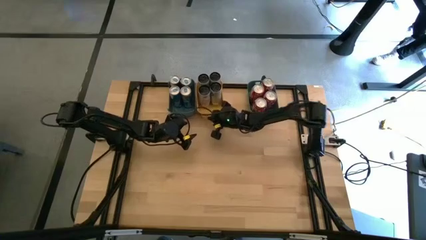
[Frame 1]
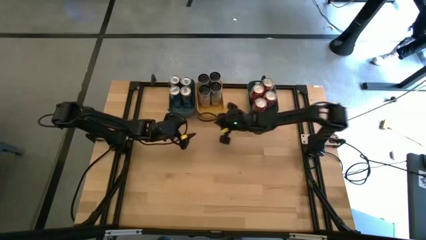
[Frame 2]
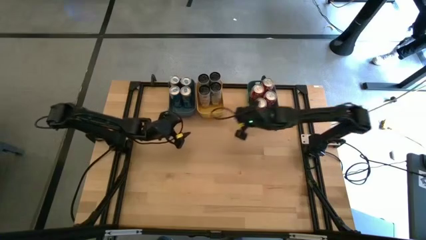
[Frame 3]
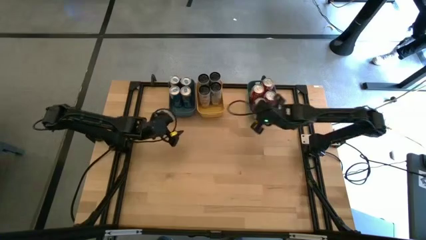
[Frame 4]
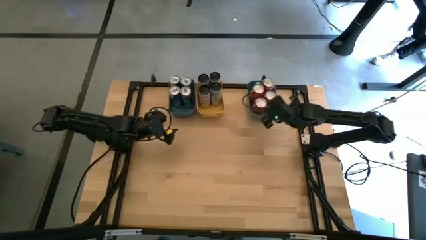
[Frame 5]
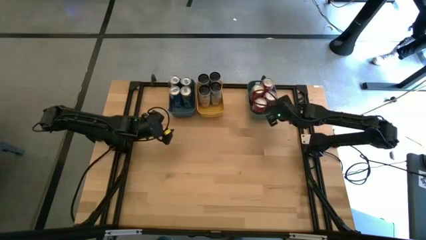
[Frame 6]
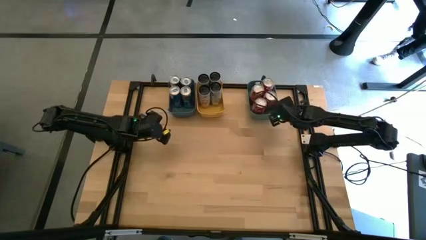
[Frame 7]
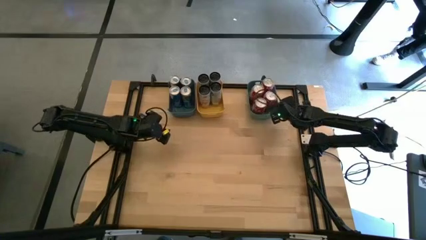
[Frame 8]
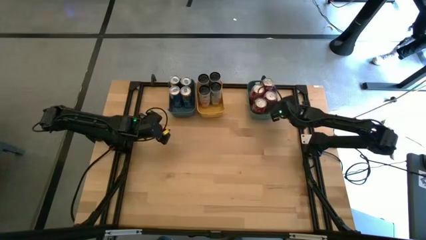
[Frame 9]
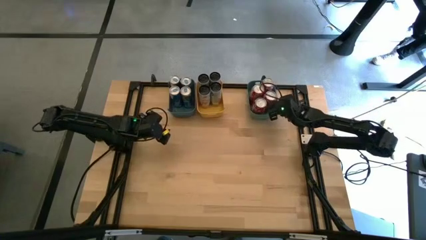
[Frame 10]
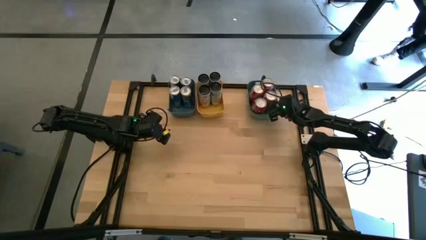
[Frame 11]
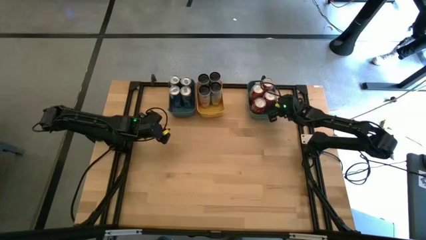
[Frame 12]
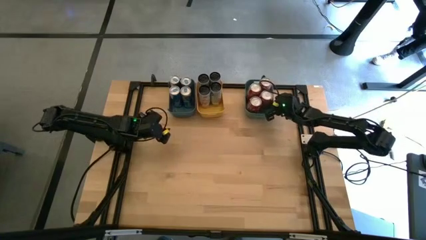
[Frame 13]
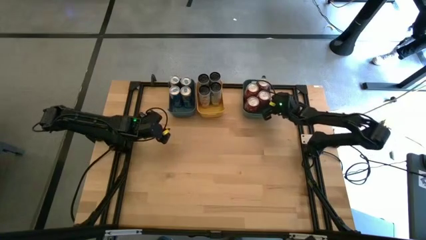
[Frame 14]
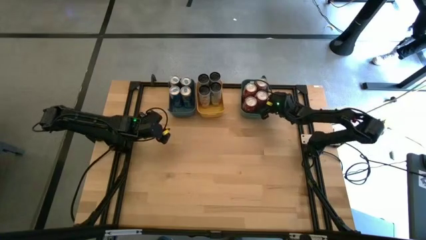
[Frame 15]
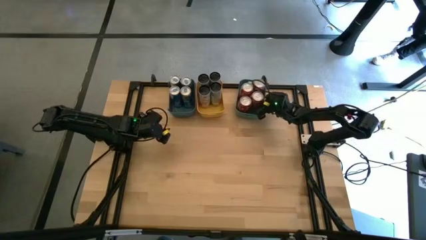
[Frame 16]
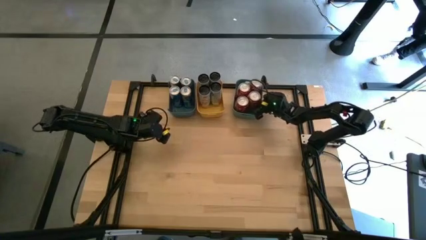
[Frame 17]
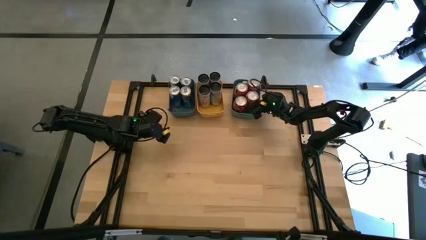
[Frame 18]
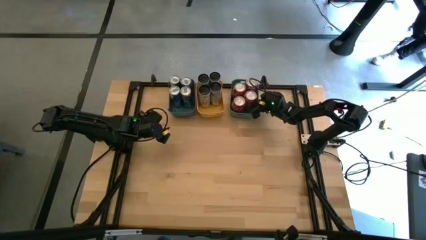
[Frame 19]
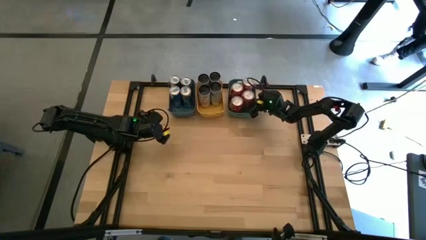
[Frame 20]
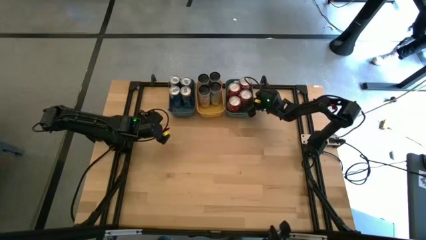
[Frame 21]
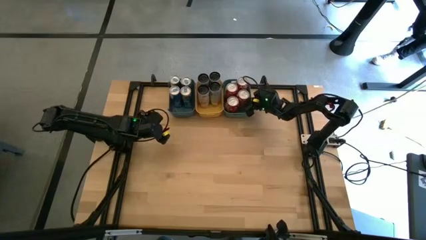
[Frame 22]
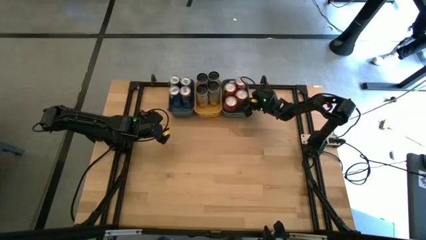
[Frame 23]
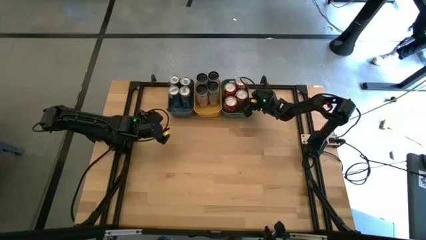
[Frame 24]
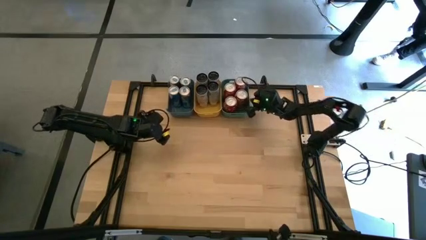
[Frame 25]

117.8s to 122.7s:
Task: Sort soda cans
Adjust the green bin

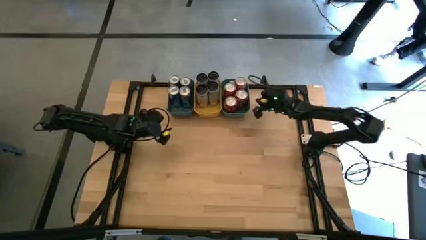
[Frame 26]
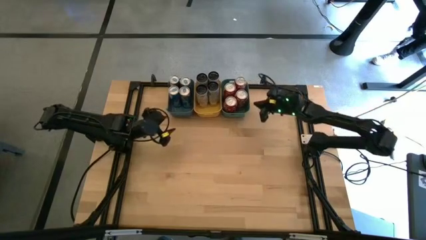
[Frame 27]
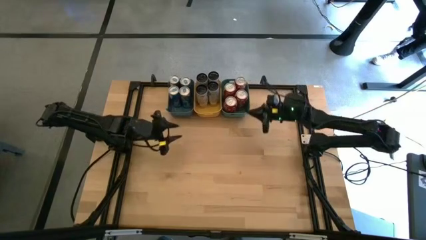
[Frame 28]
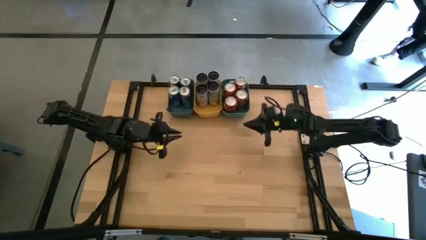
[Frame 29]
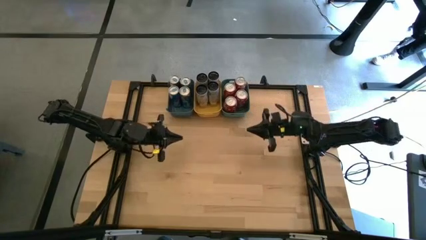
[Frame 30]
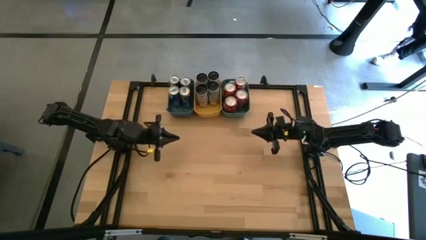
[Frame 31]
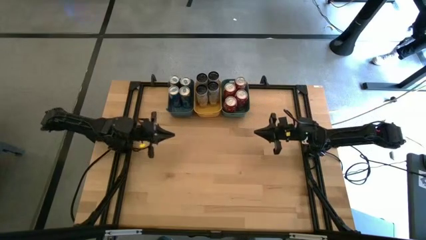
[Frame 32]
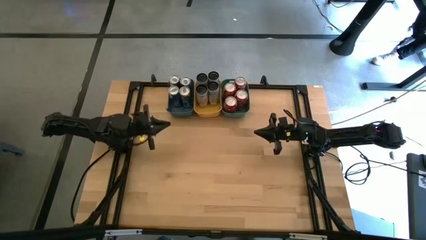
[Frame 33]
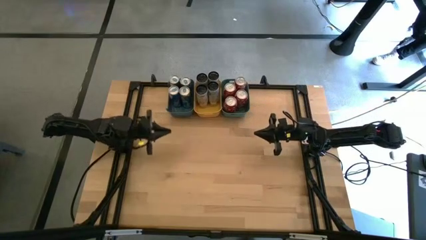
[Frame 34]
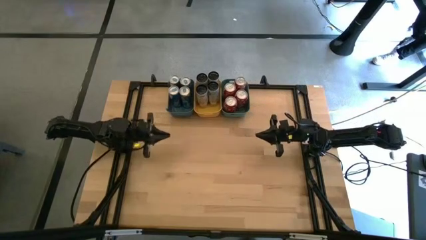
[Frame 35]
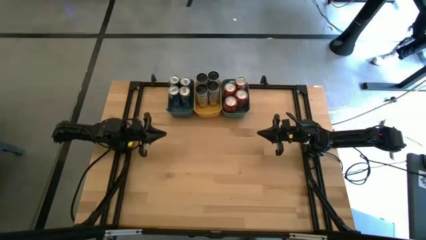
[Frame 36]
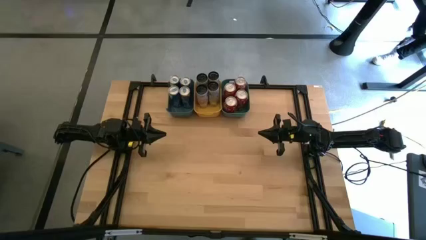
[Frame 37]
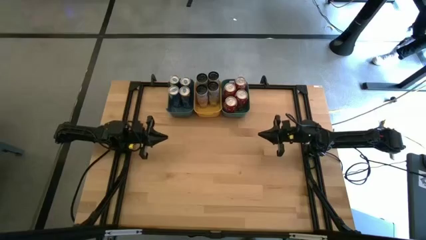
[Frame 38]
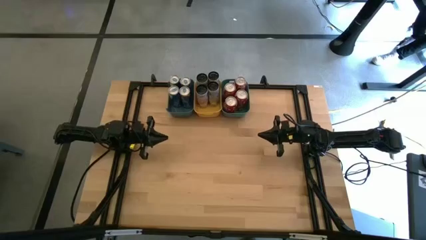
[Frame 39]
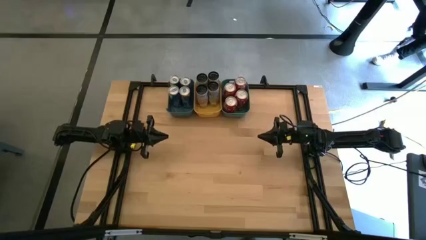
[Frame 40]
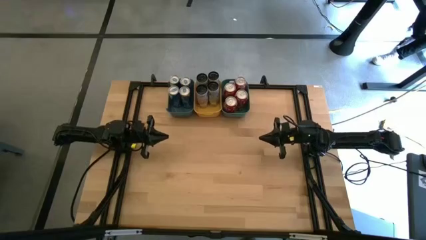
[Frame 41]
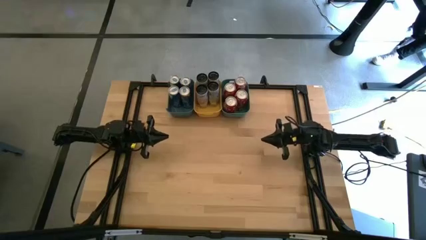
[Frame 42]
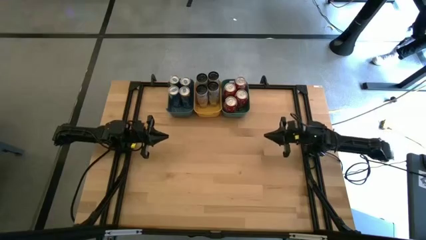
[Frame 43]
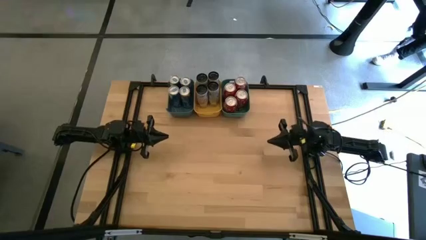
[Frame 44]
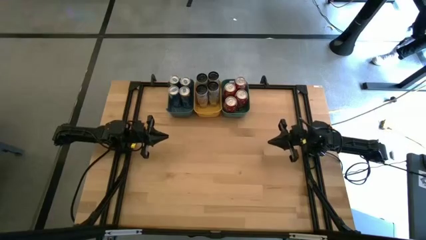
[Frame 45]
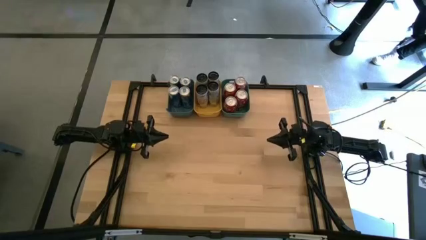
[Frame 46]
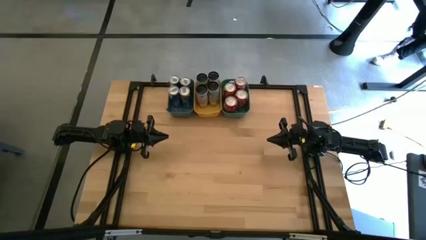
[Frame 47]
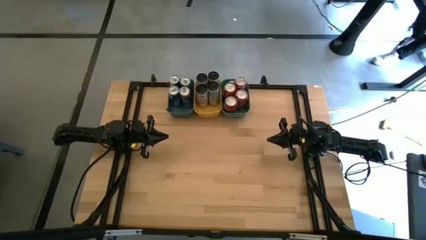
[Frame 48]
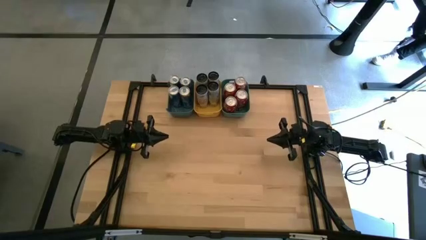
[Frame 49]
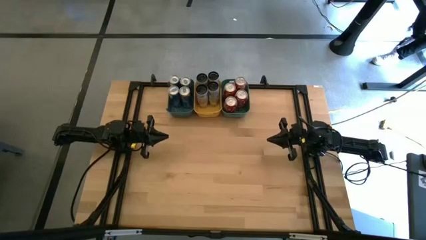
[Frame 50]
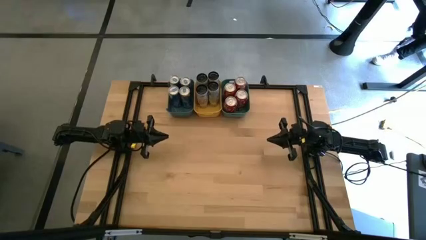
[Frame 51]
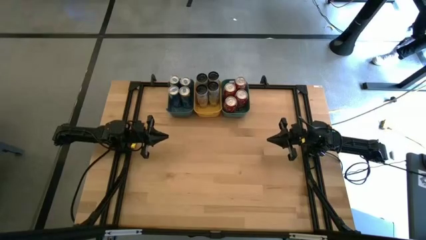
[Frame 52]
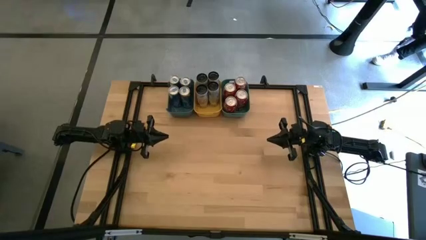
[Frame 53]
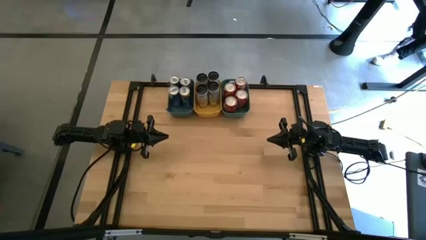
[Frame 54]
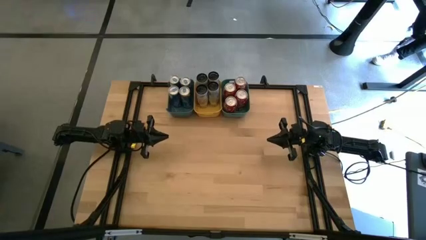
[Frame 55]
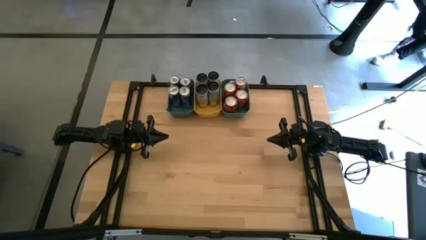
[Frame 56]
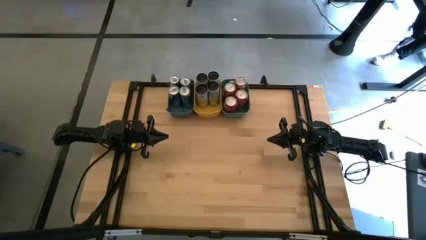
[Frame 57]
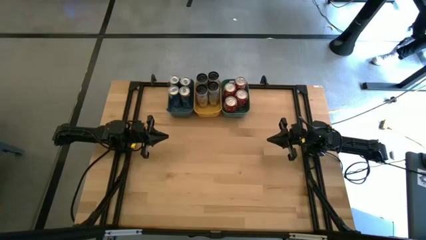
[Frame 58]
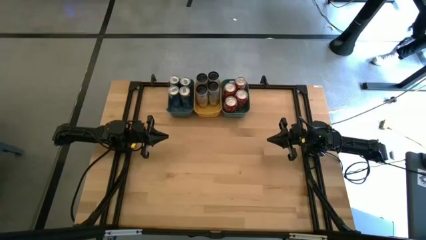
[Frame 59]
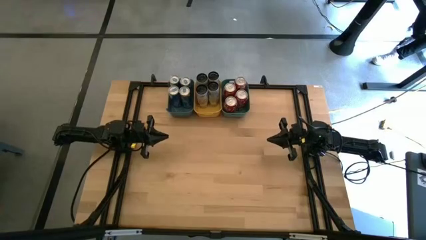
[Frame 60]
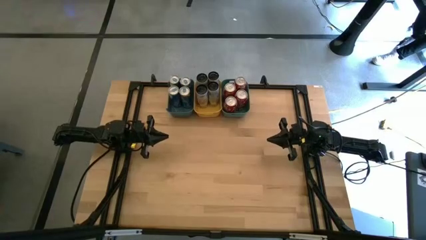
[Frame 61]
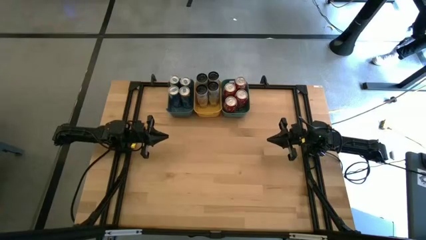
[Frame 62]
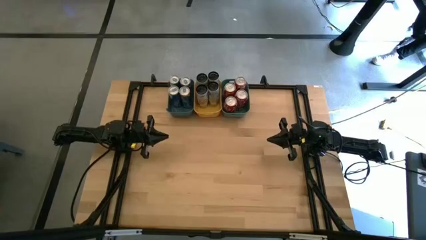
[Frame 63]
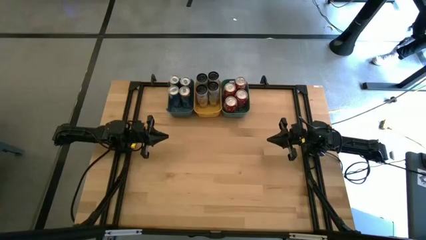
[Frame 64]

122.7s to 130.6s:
Return to Home Position
